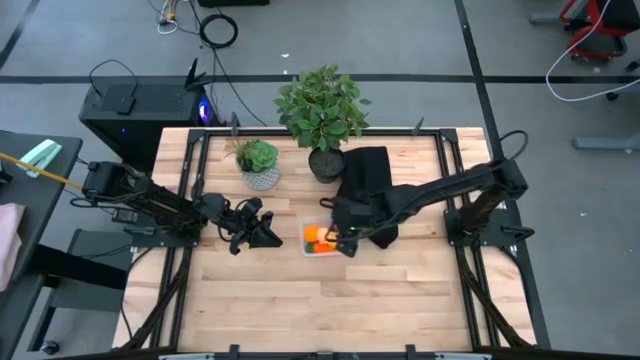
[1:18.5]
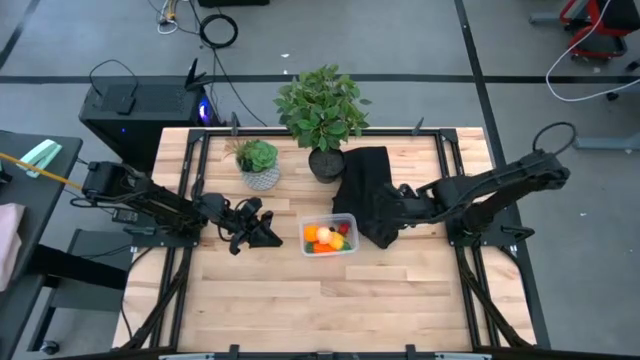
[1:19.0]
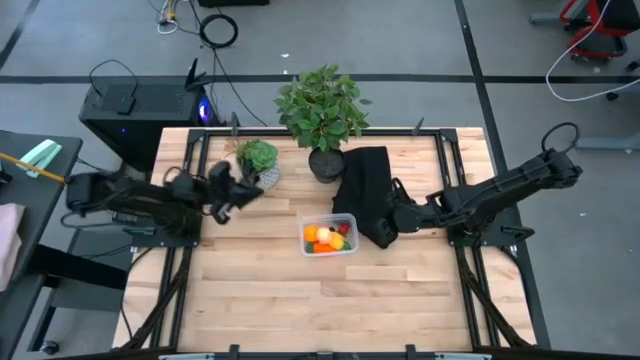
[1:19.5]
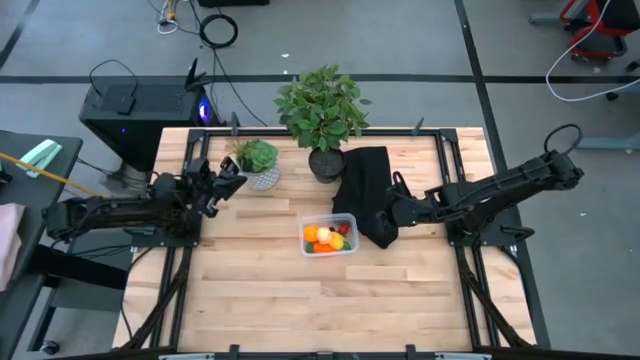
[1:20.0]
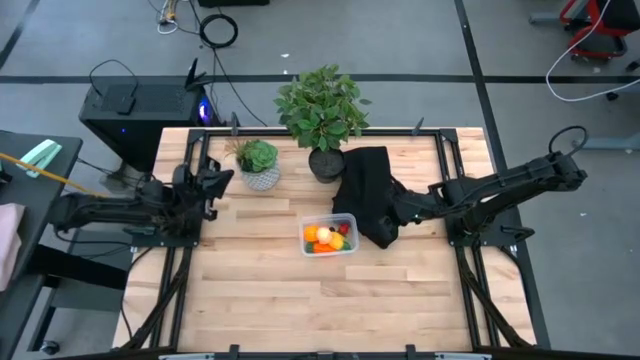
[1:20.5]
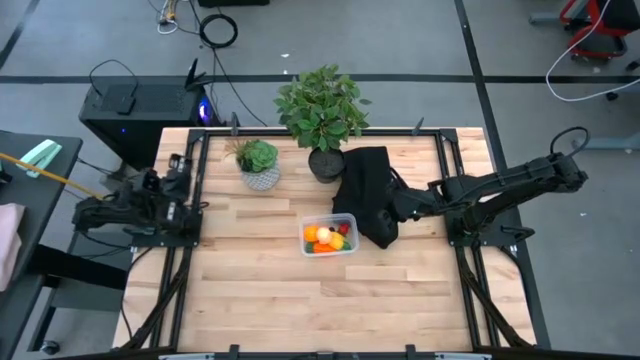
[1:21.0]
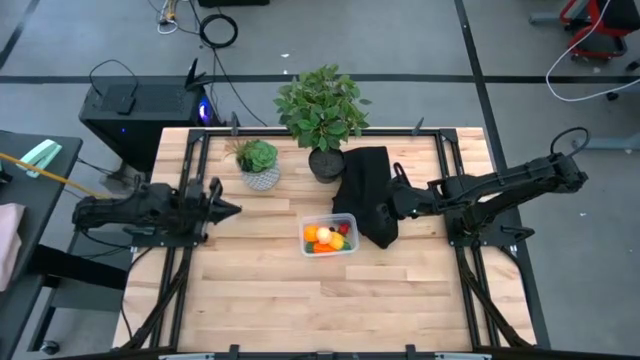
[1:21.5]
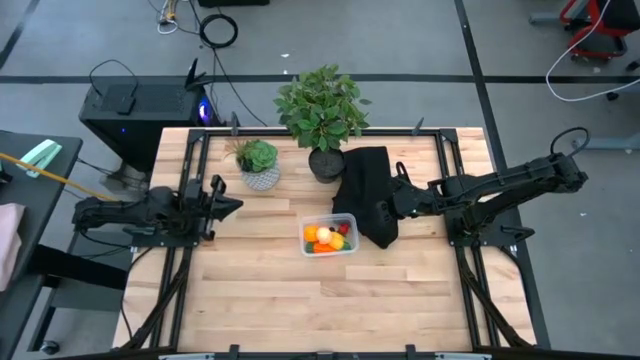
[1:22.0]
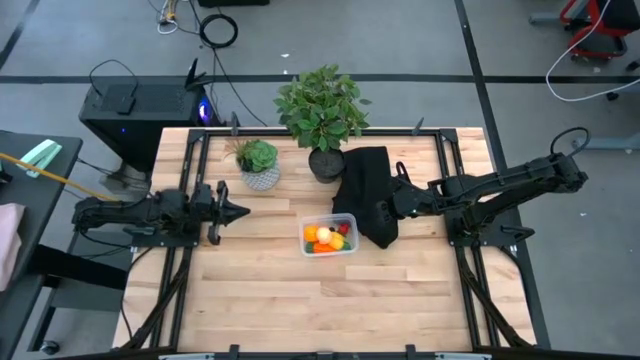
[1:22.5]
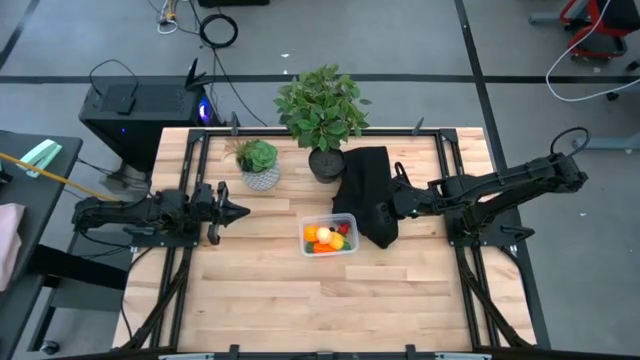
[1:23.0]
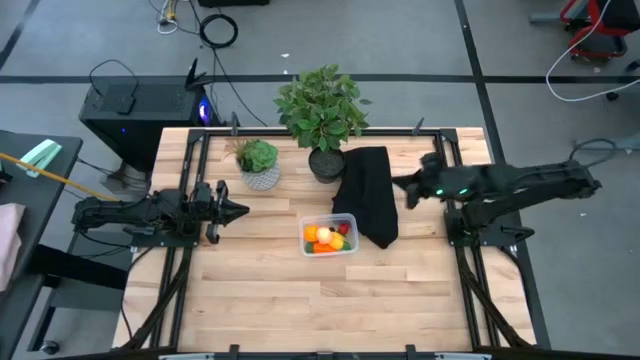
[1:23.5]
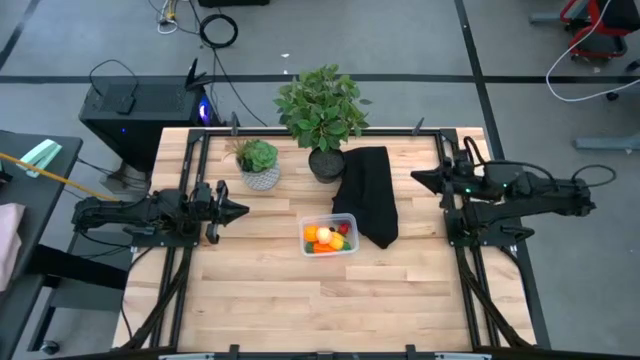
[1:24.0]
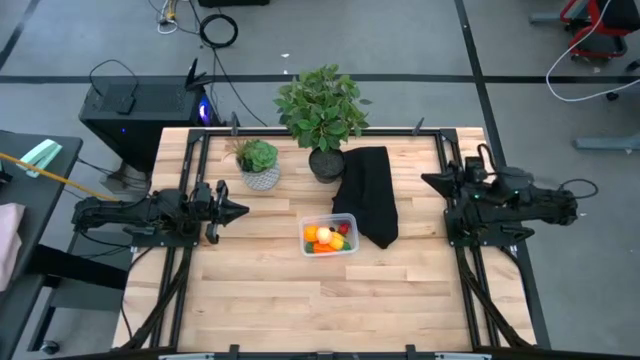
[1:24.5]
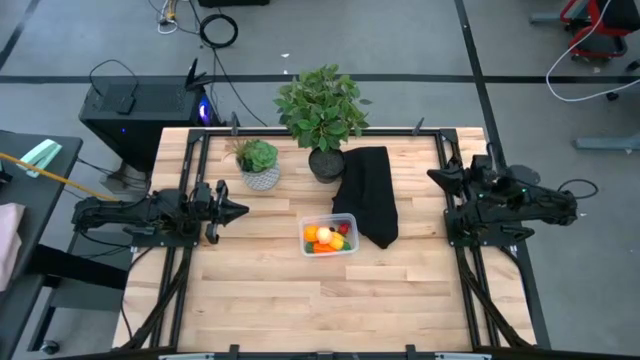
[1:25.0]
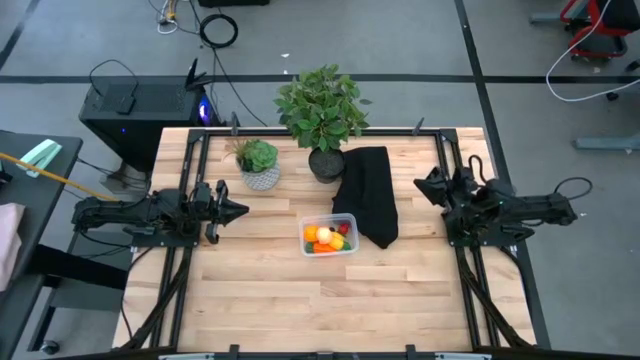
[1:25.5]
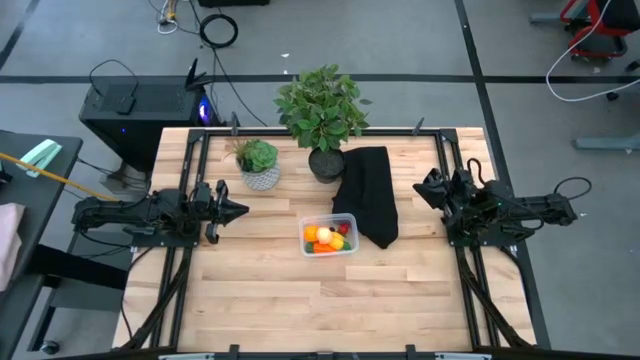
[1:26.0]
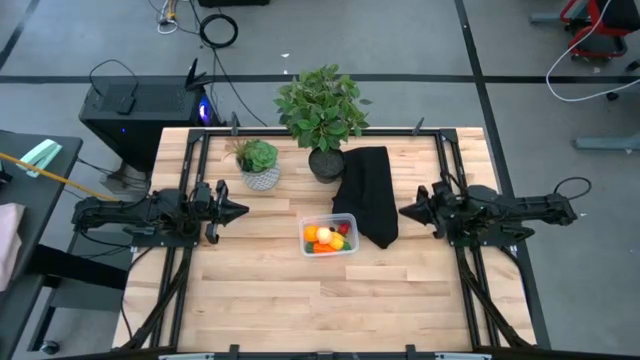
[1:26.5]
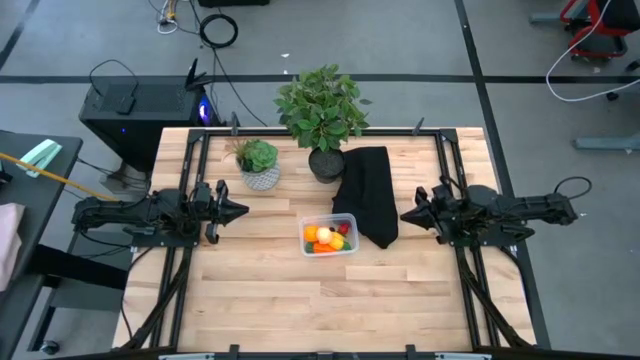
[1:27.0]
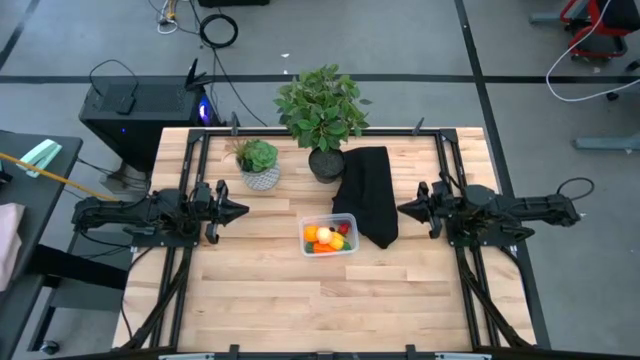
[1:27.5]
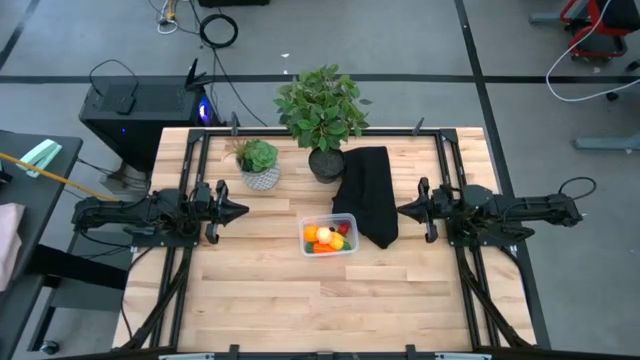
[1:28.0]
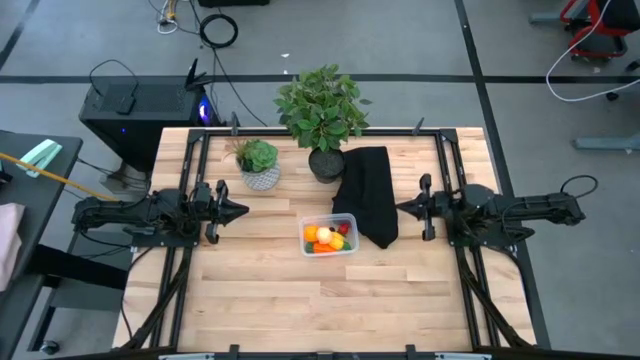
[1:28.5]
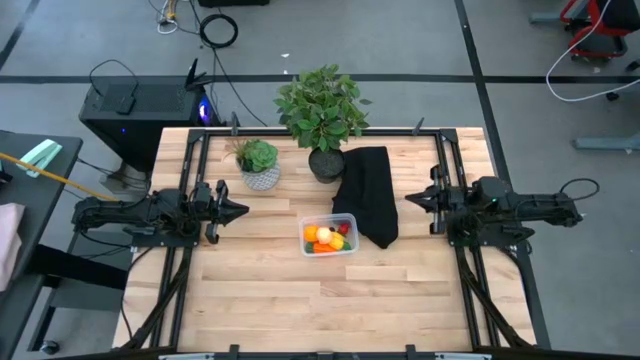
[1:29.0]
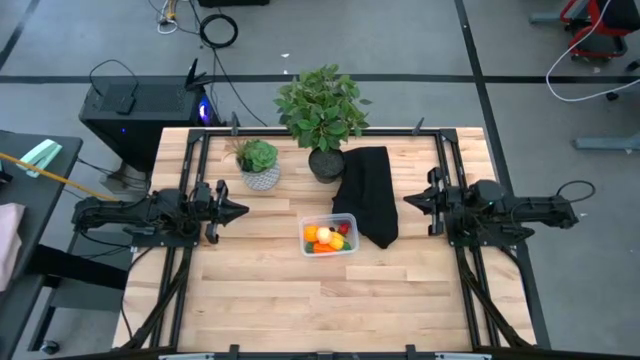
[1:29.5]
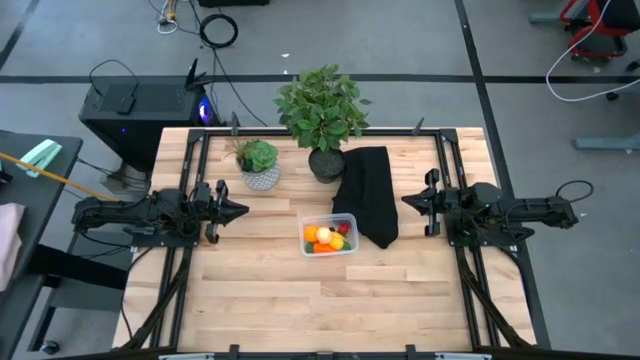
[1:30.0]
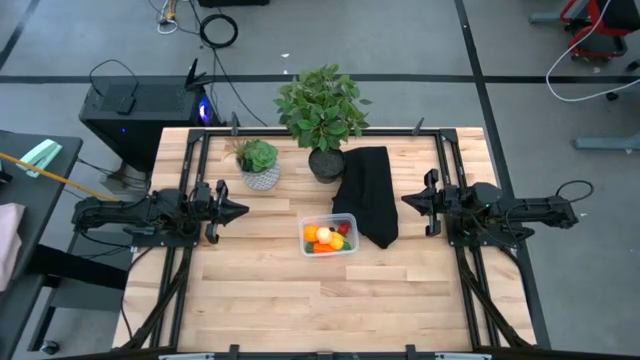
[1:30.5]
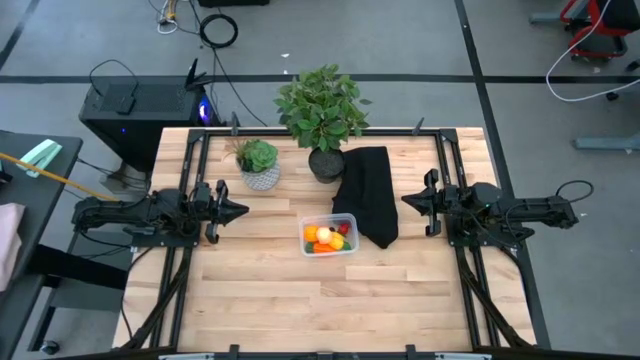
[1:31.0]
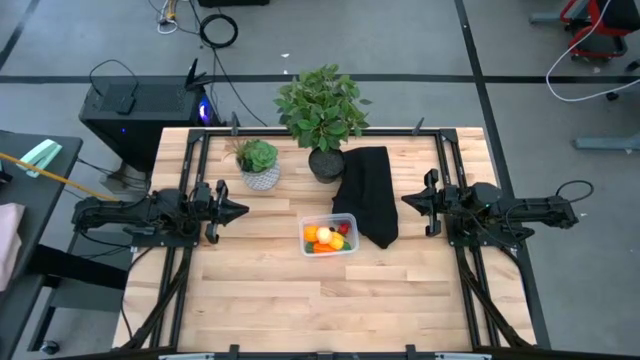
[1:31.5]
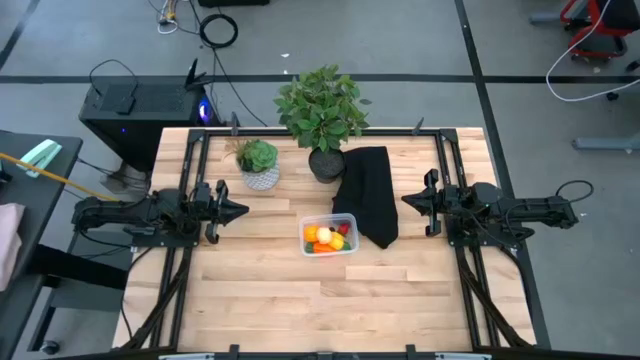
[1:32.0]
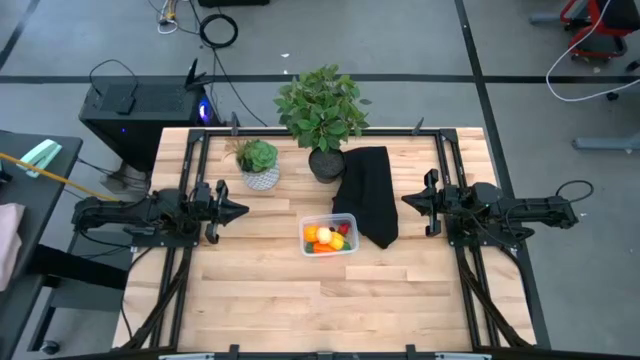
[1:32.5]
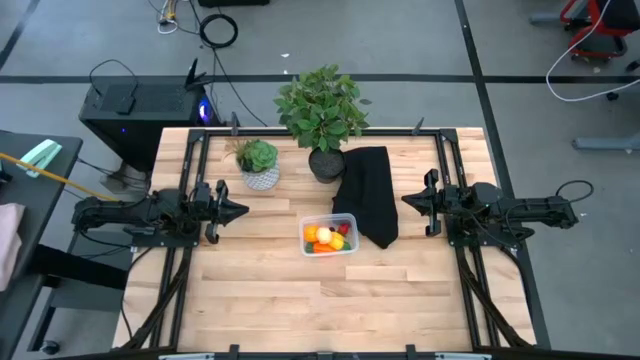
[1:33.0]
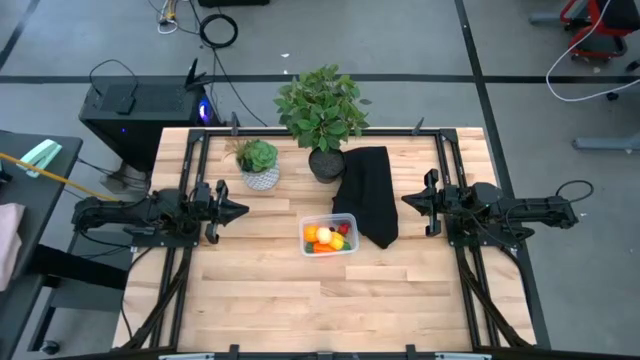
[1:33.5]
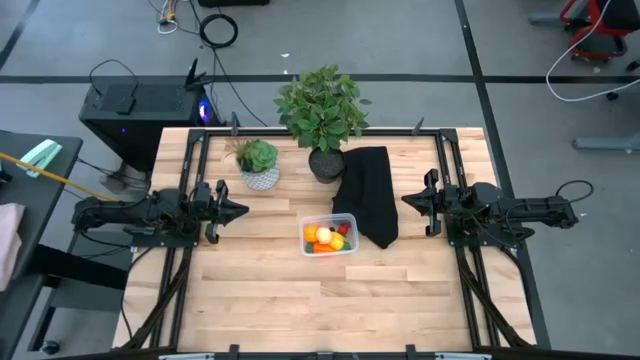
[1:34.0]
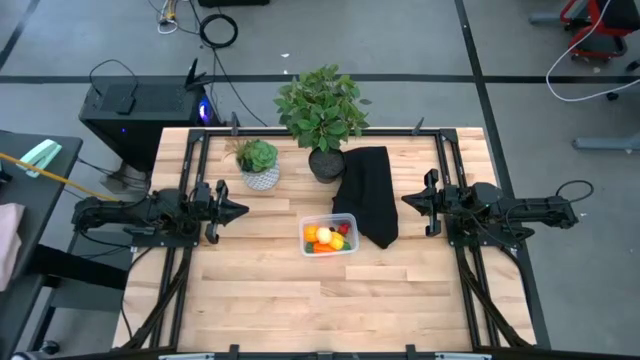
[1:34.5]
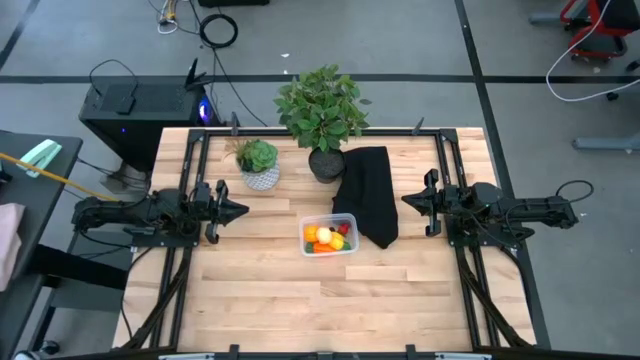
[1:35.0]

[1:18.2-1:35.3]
Task: Pick and placing Produce into tupperware
Return to Home Position

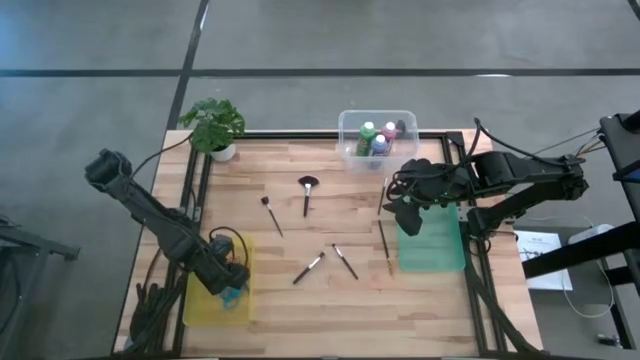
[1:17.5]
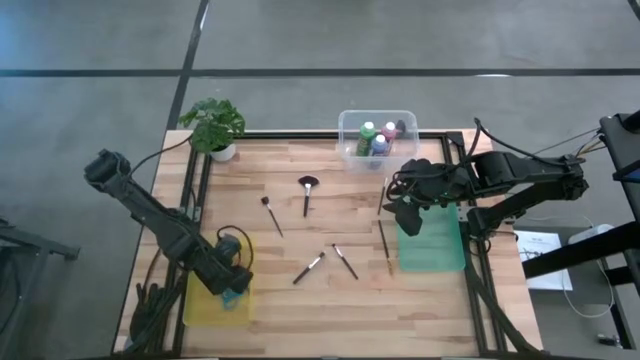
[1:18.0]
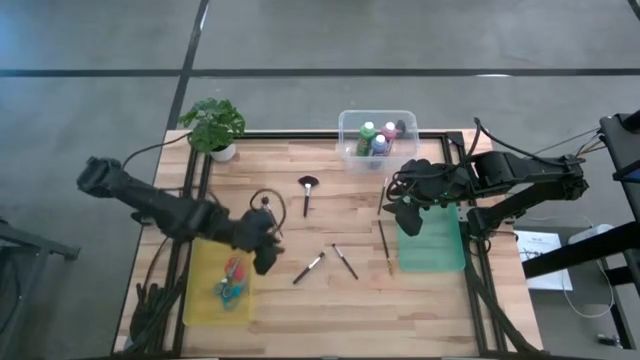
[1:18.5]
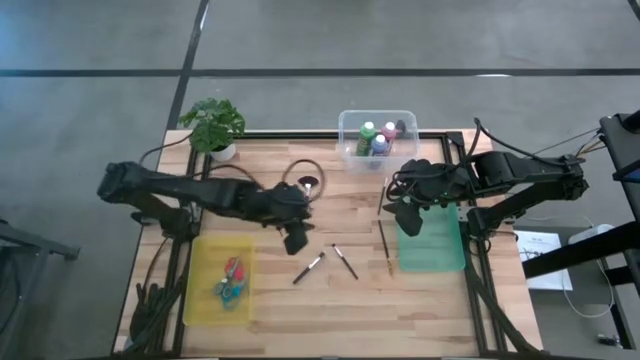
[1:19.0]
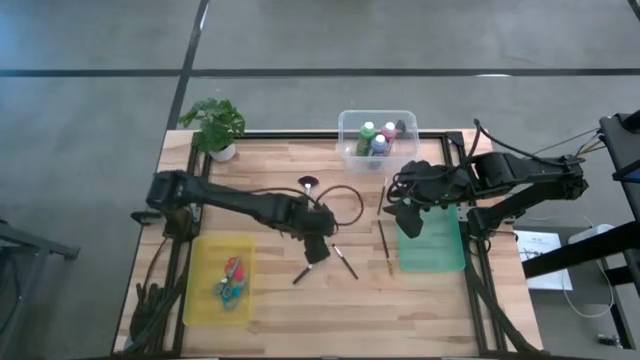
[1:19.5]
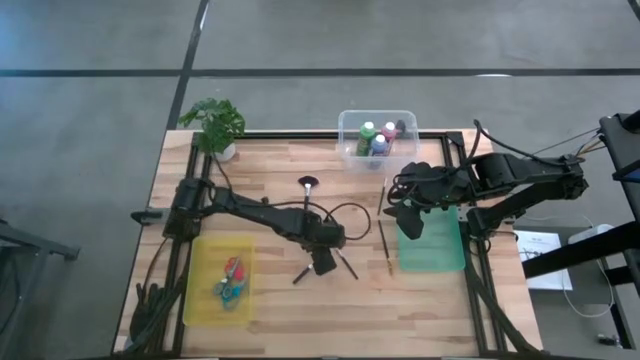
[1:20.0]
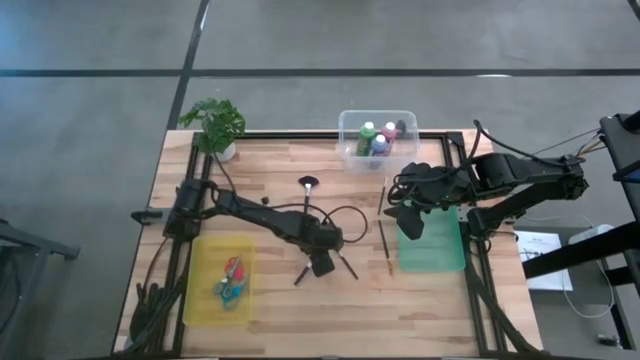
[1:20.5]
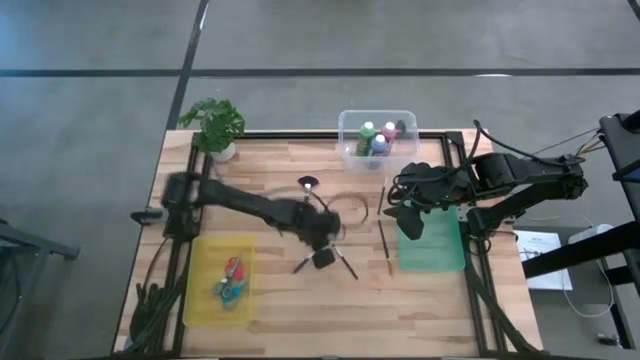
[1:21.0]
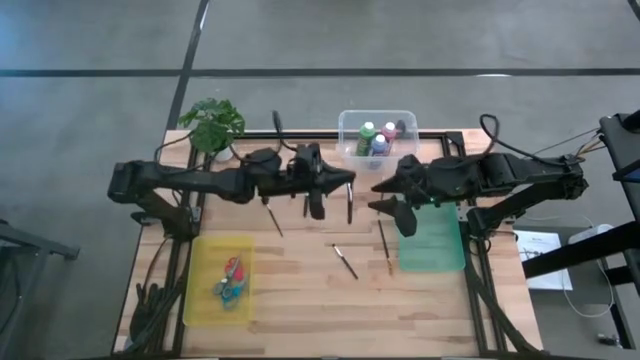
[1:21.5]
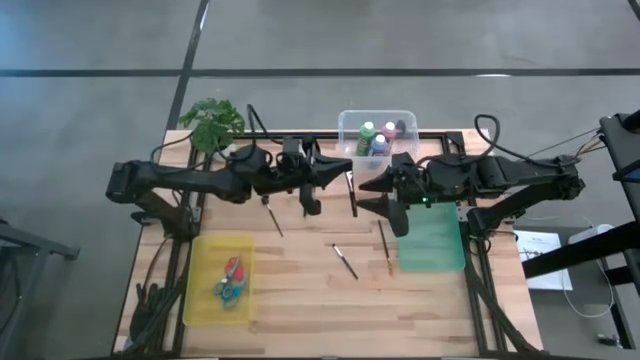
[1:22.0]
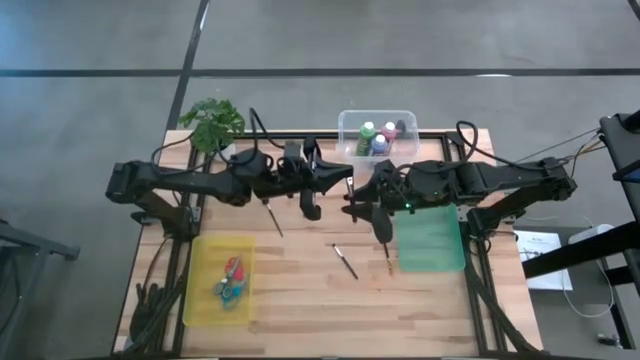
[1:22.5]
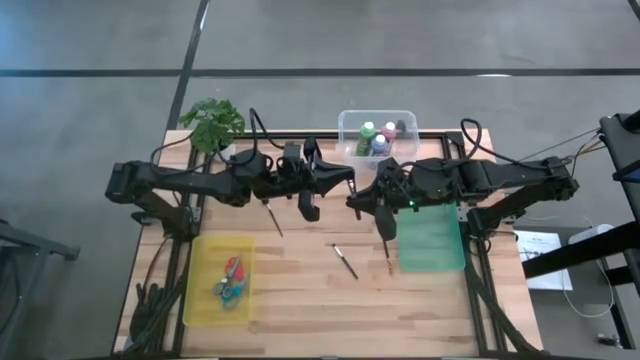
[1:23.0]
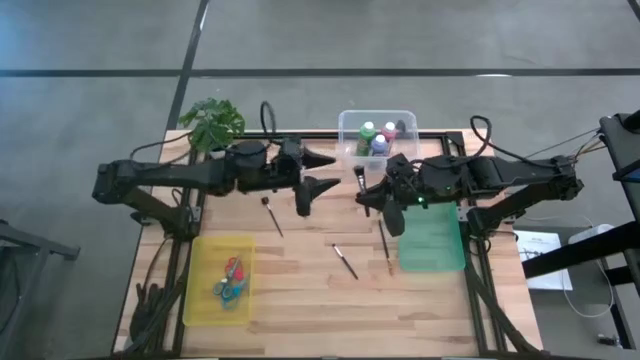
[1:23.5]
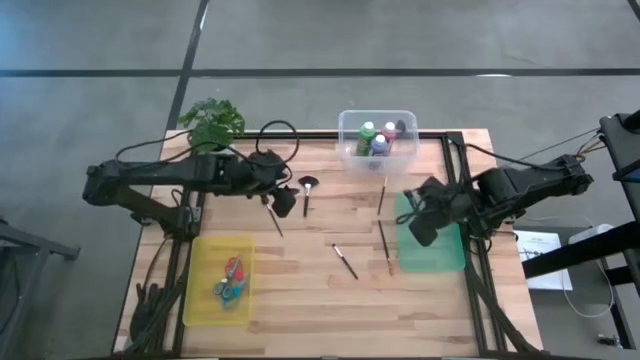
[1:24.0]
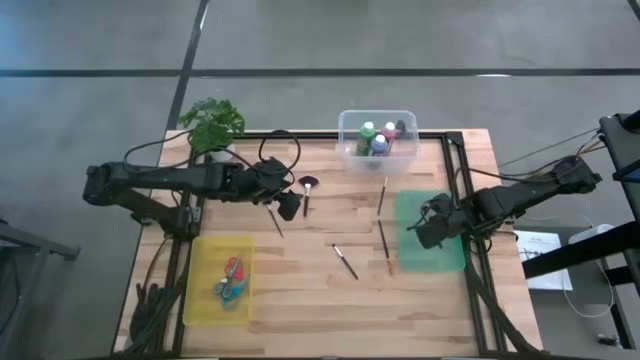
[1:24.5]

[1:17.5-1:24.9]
Task: Pick & Place Paint Supplies
Put the black eyeshadow brush into the green bin
